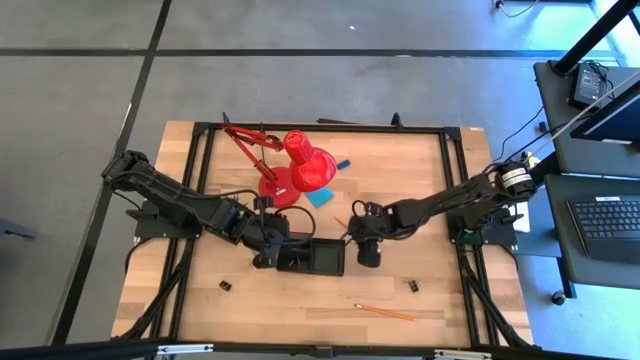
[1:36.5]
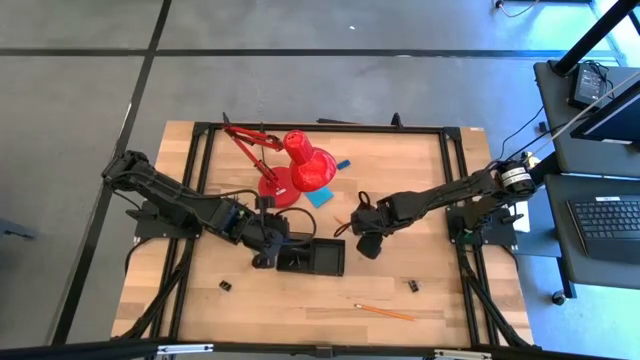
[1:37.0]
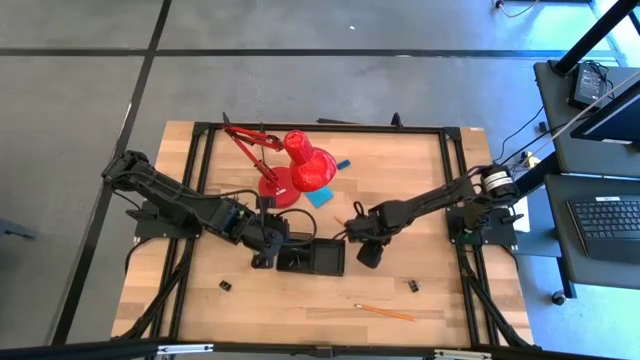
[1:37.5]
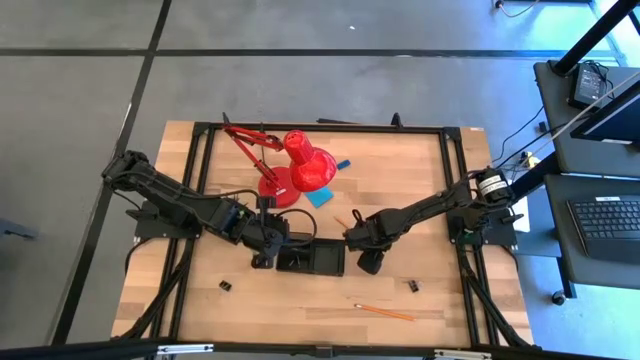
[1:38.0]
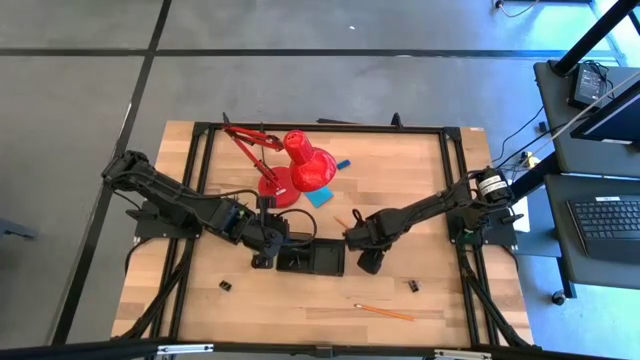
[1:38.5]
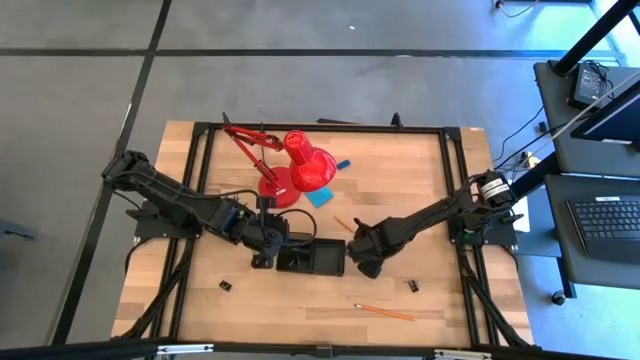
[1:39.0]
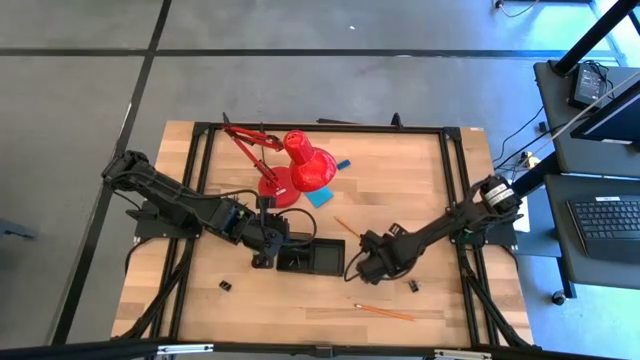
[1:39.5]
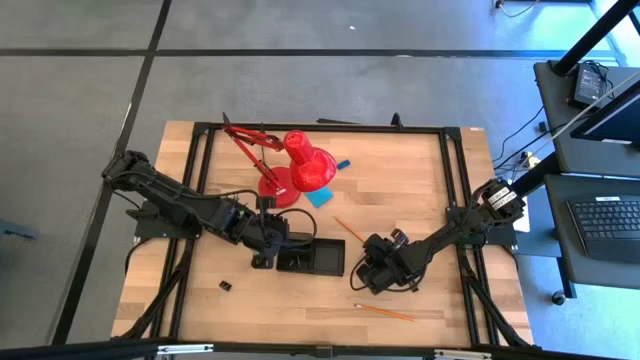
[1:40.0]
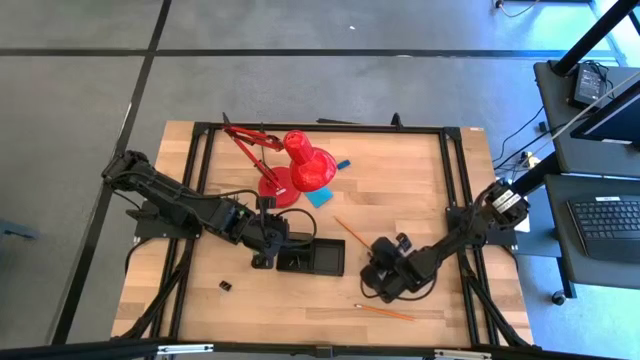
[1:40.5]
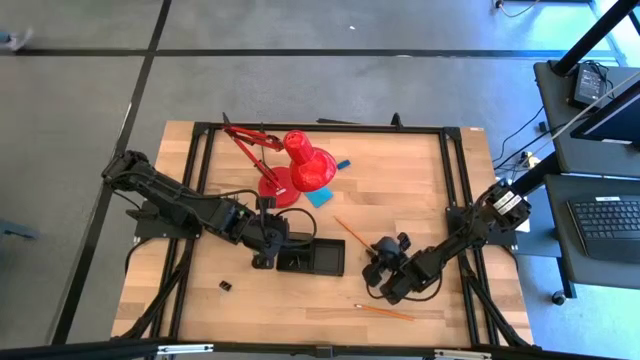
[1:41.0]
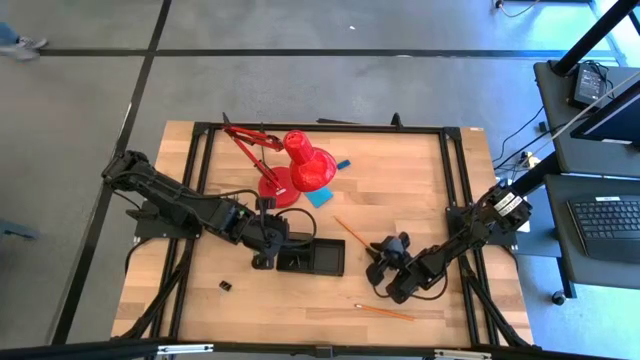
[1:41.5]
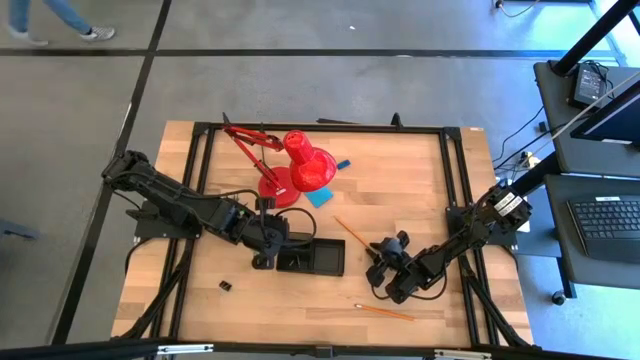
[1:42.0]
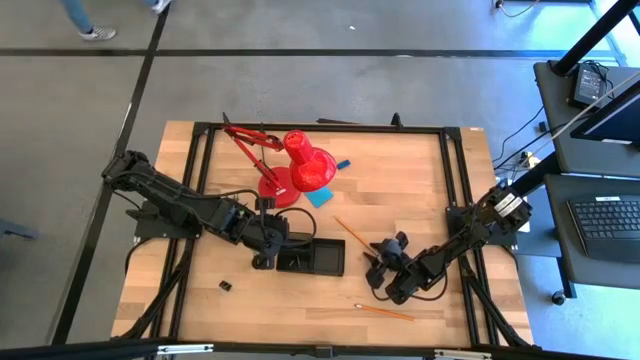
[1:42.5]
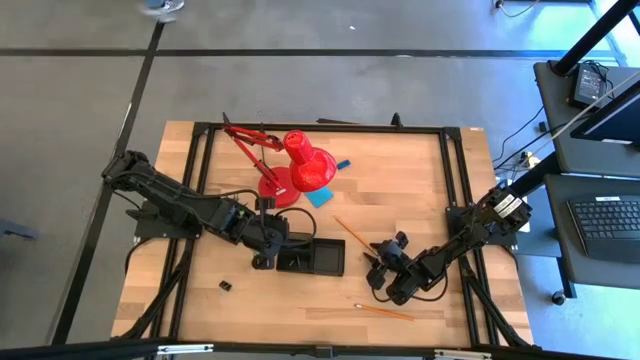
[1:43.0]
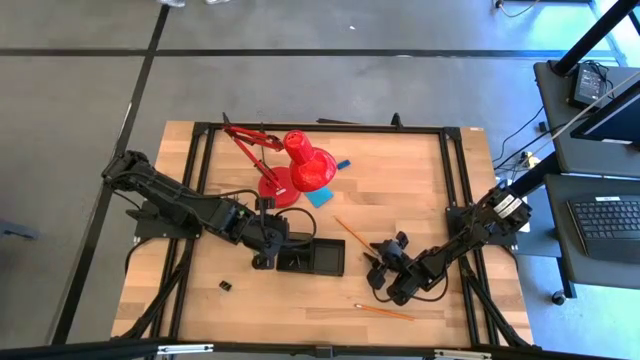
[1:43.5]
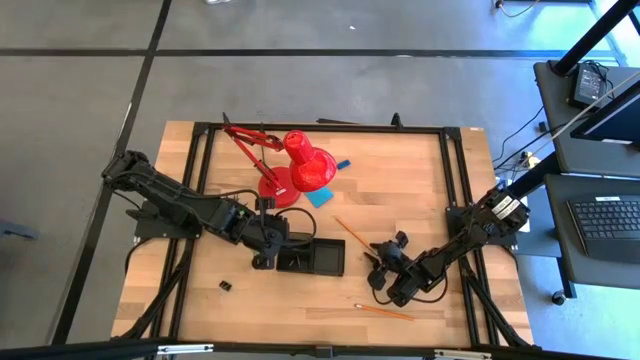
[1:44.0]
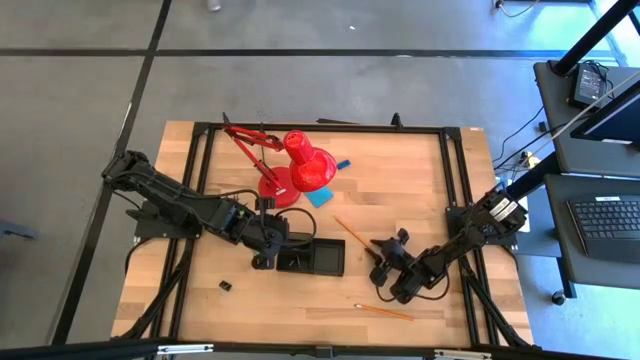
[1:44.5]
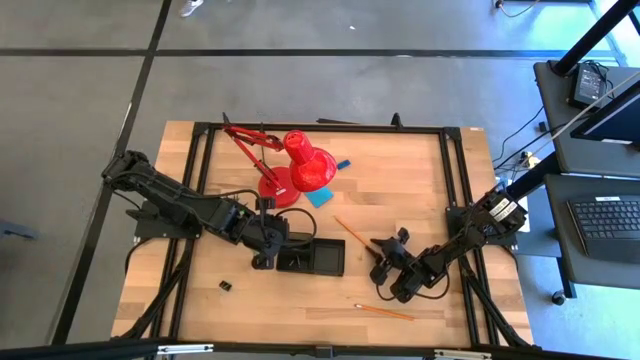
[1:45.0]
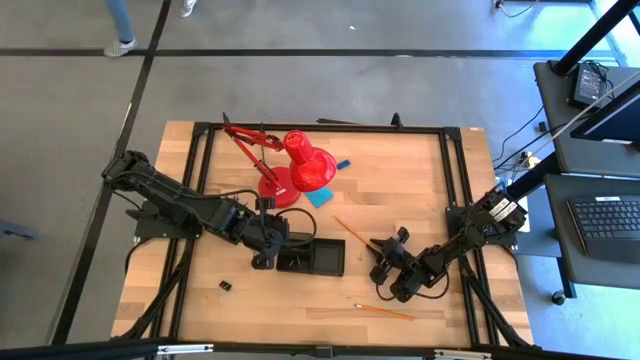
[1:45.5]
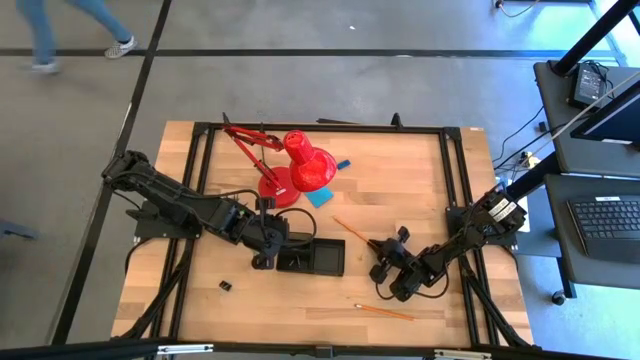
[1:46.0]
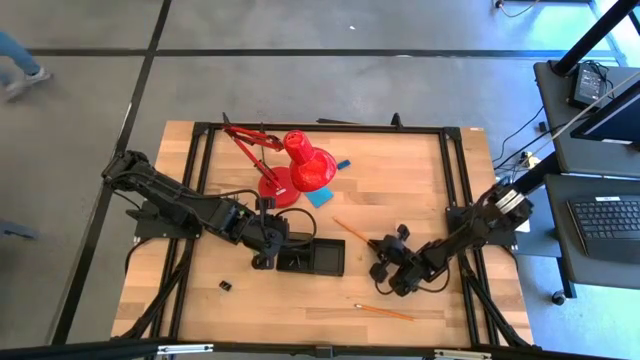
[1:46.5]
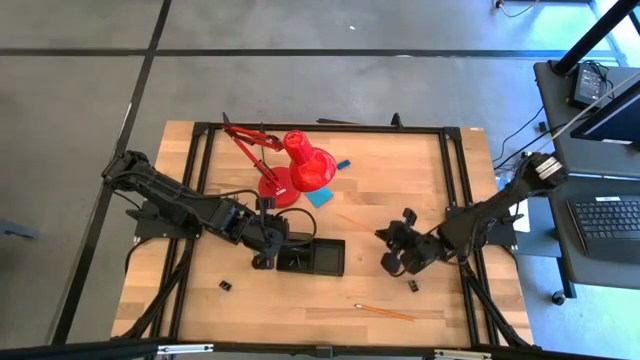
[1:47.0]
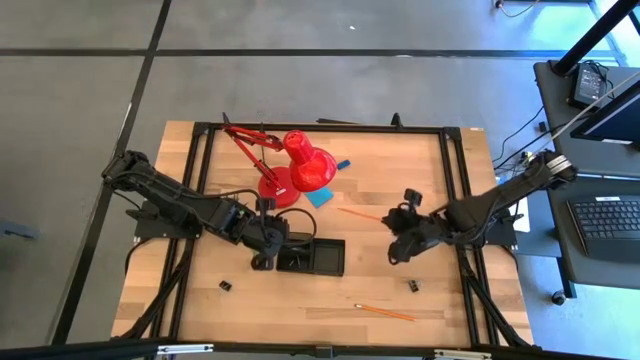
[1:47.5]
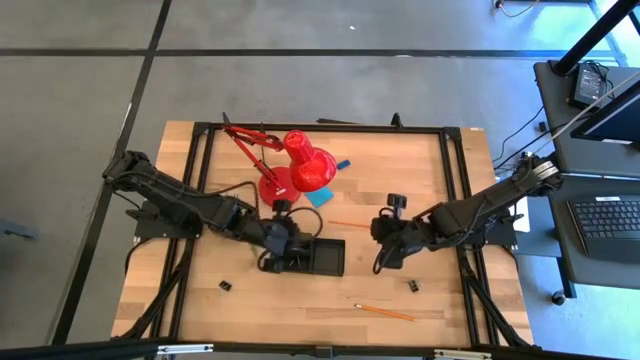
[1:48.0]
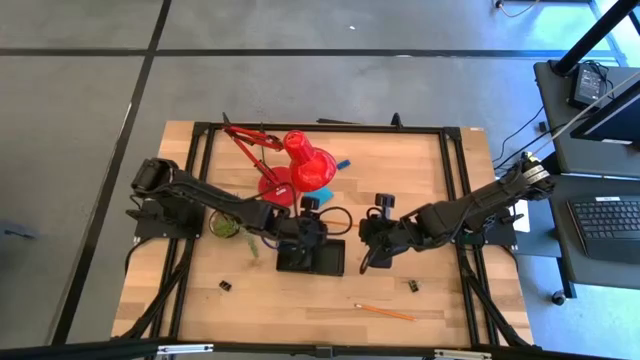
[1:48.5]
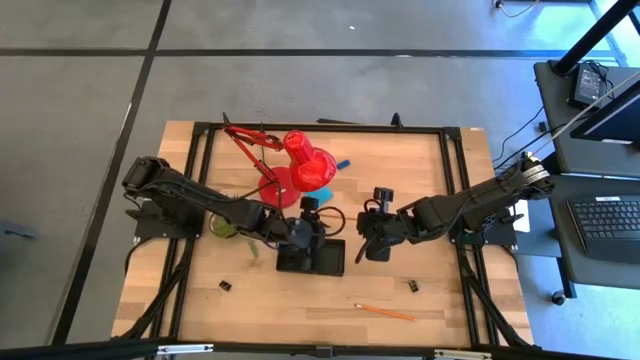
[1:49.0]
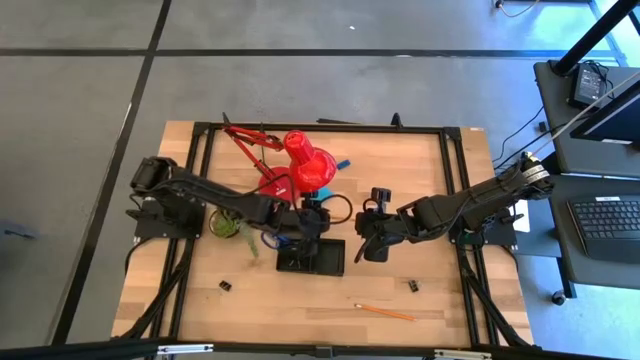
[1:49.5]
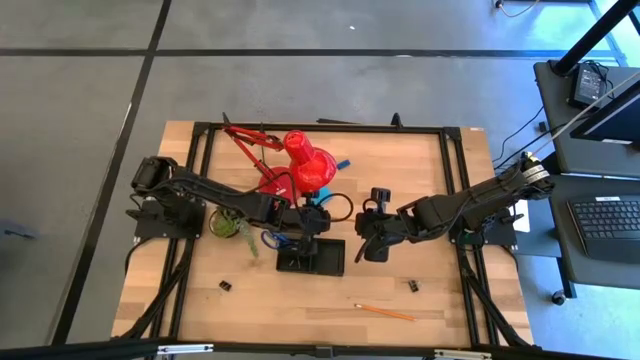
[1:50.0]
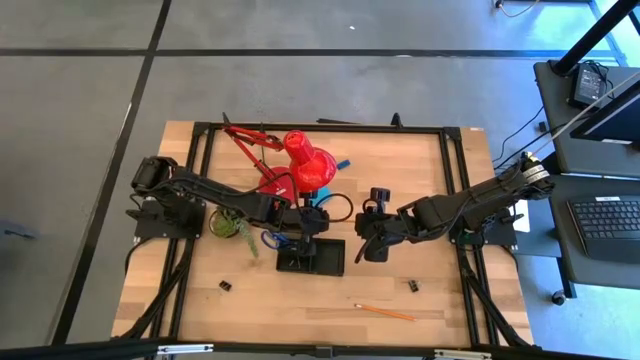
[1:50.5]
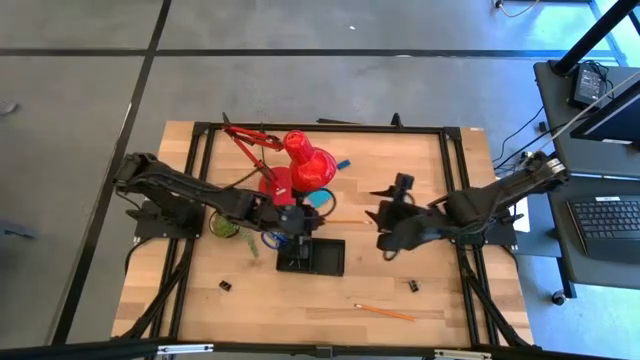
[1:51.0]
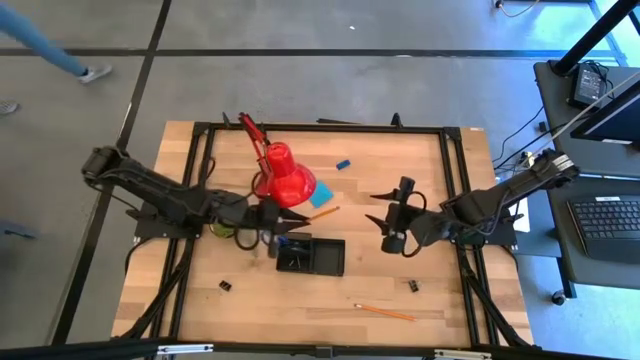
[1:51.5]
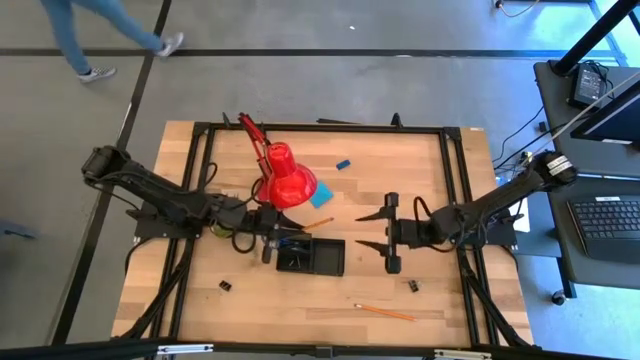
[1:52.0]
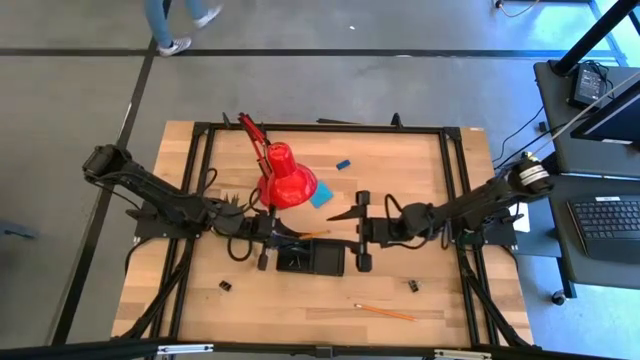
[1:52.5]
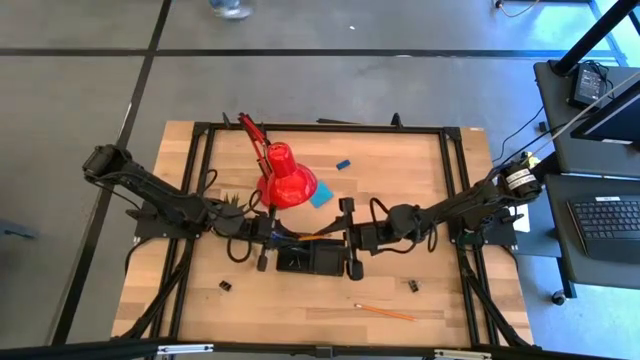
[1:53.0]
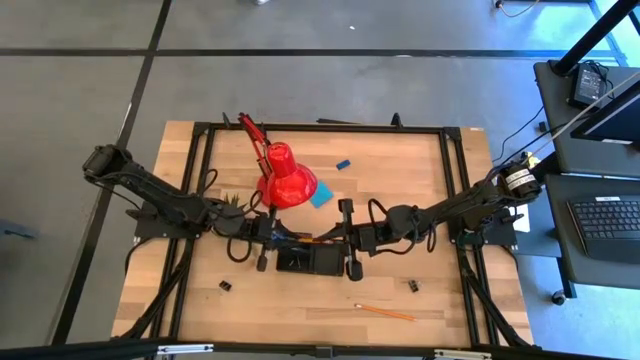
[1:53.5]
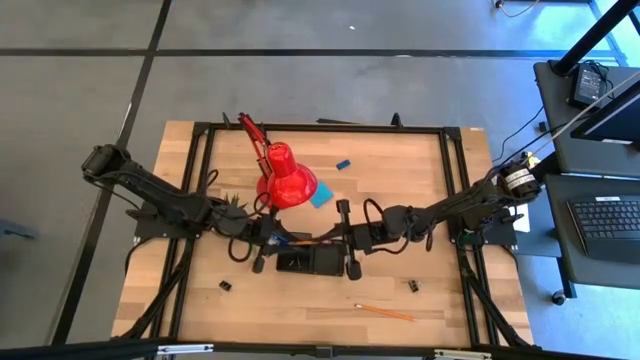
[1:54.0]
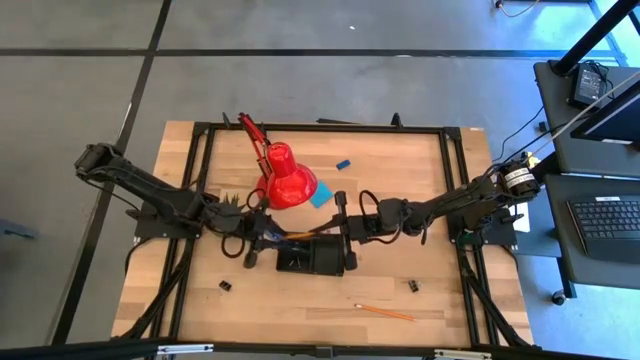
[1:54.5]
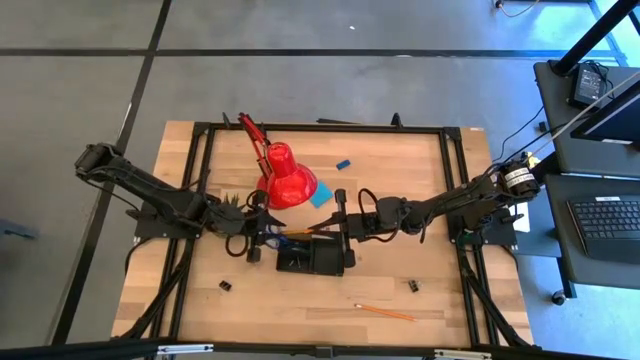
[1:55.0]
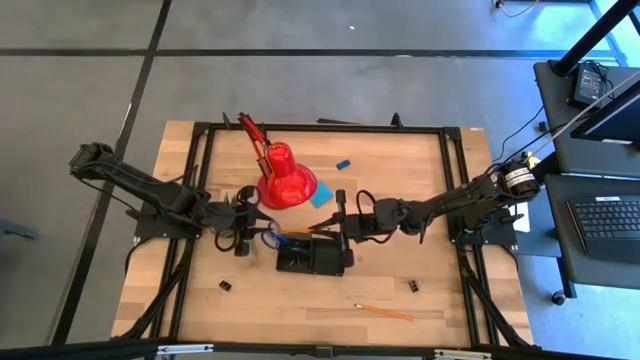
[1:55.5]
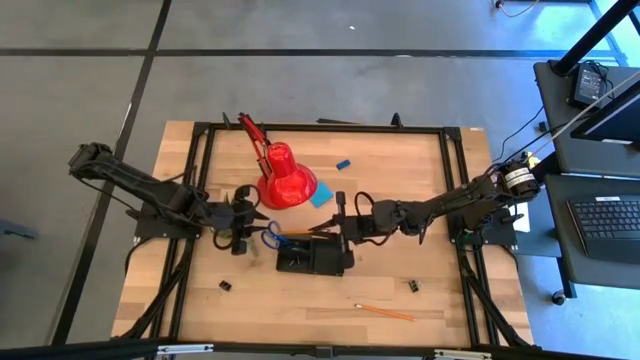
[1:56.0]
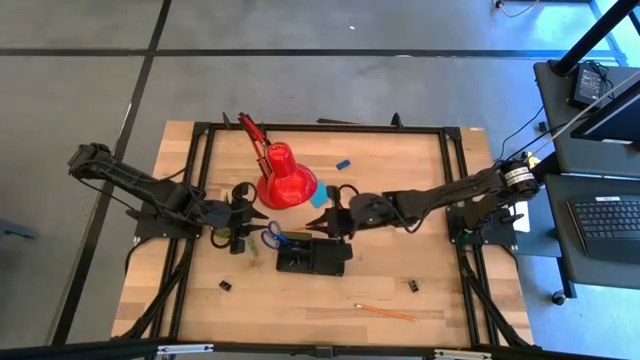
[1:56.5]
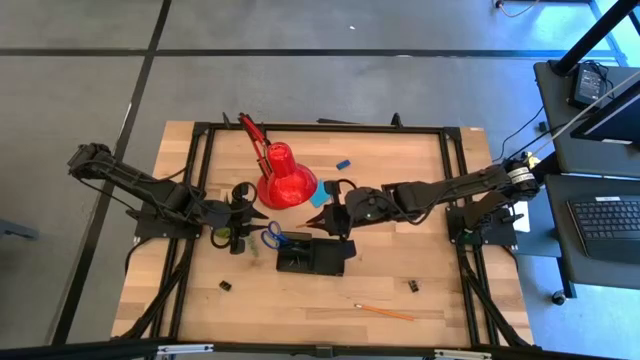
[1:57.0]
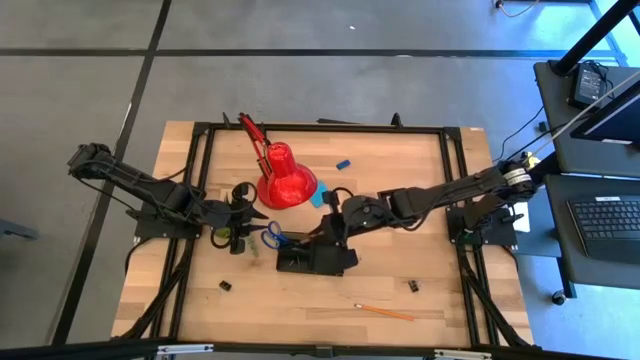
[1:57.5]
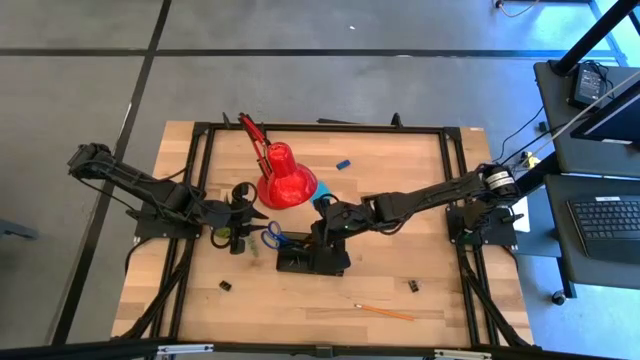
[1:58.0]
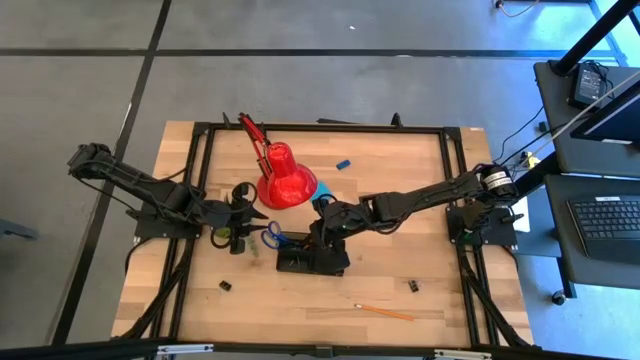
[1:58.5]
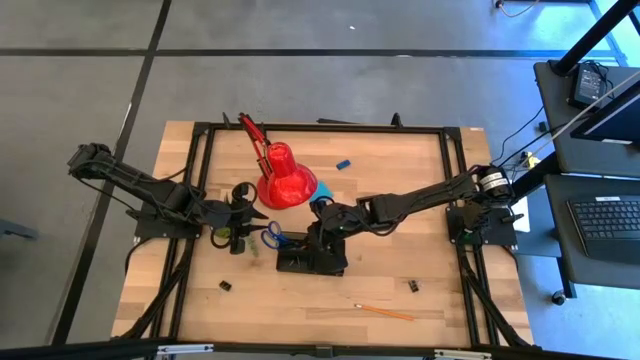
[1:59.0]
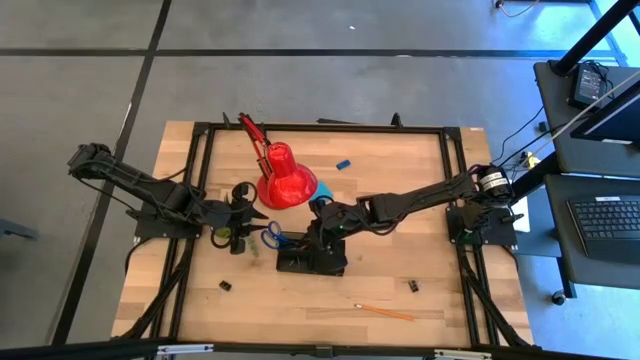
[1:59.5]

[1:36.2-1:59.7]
Task: Pick and place office supplies into organizer
Put the top orange pencil into the desk organizer
